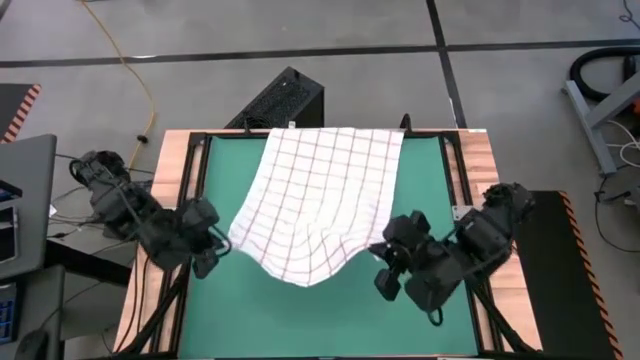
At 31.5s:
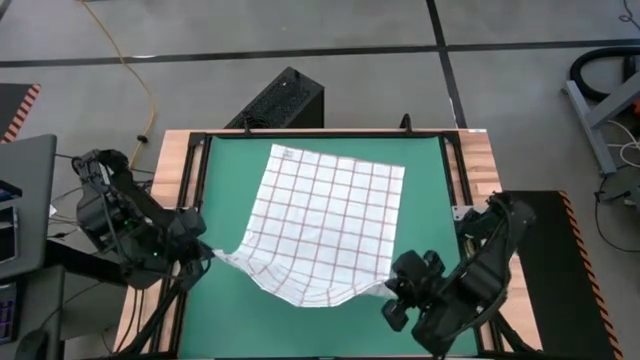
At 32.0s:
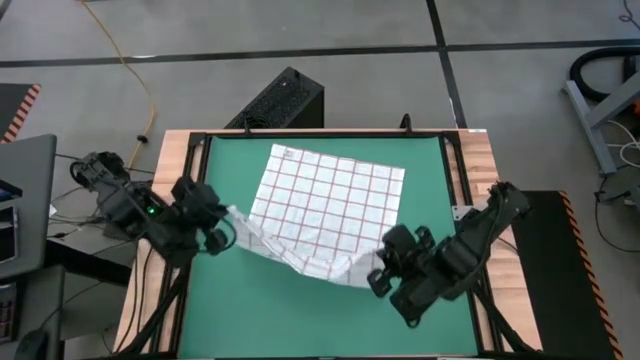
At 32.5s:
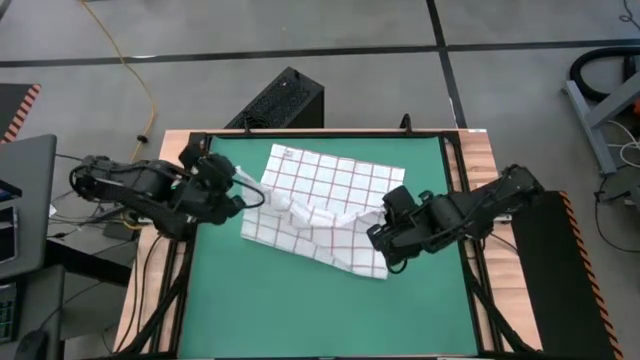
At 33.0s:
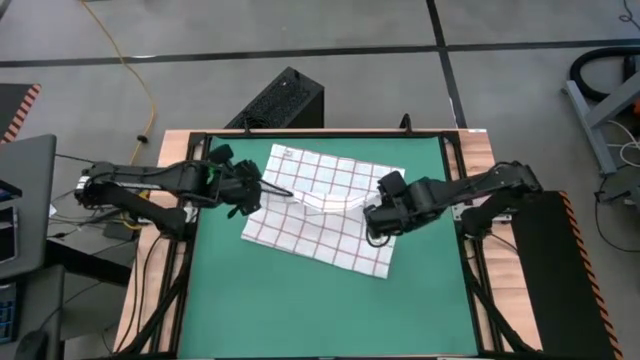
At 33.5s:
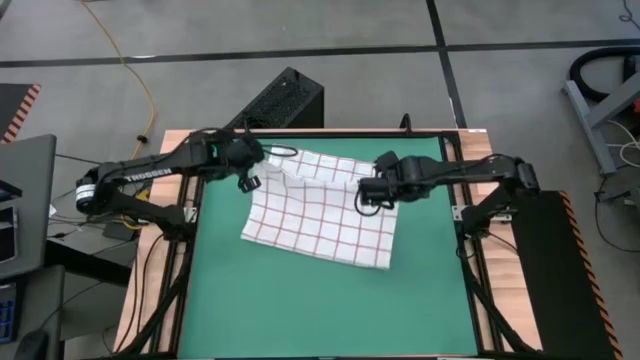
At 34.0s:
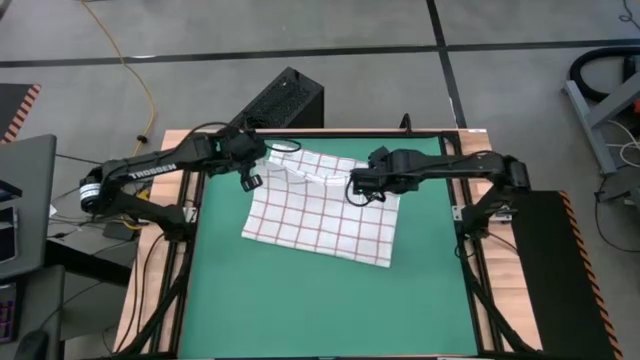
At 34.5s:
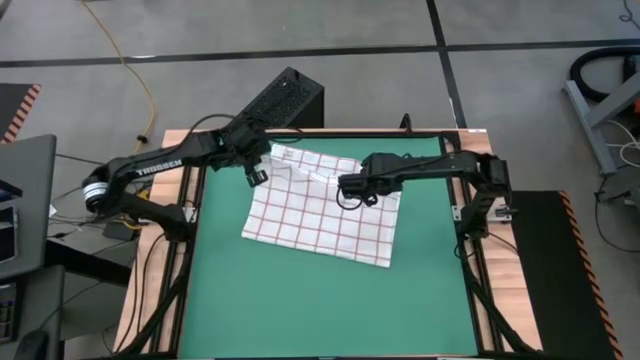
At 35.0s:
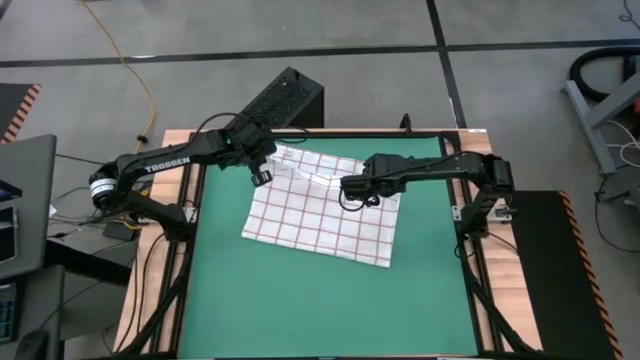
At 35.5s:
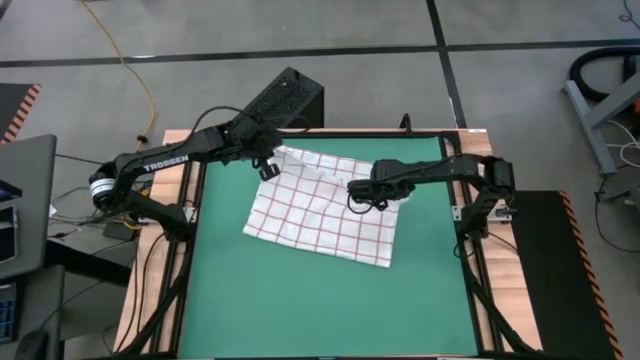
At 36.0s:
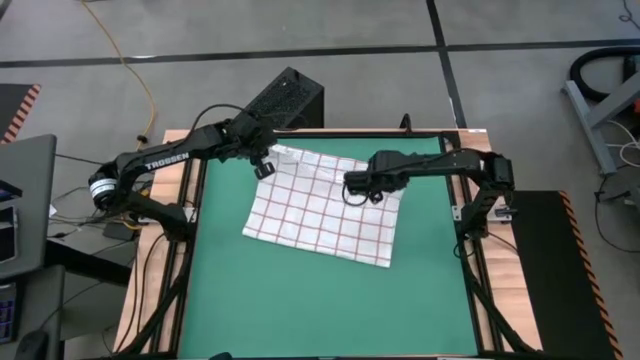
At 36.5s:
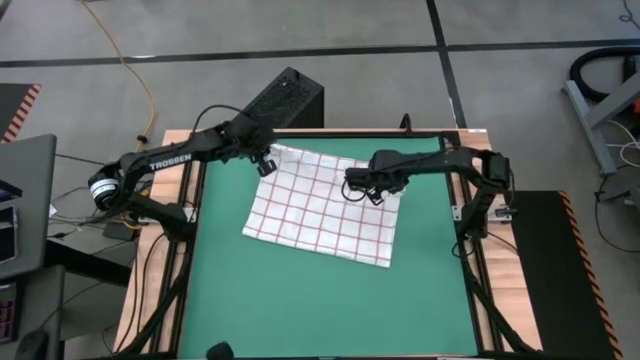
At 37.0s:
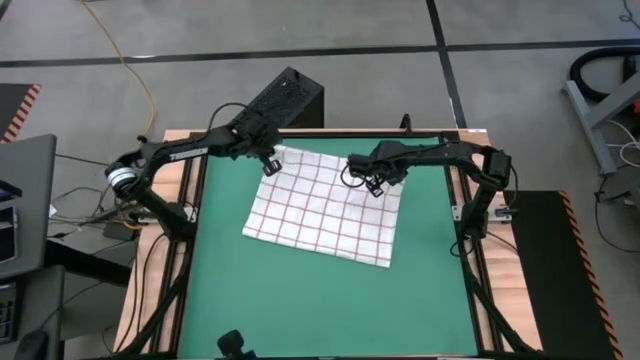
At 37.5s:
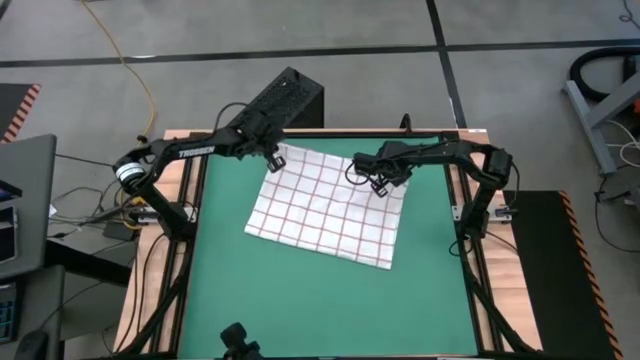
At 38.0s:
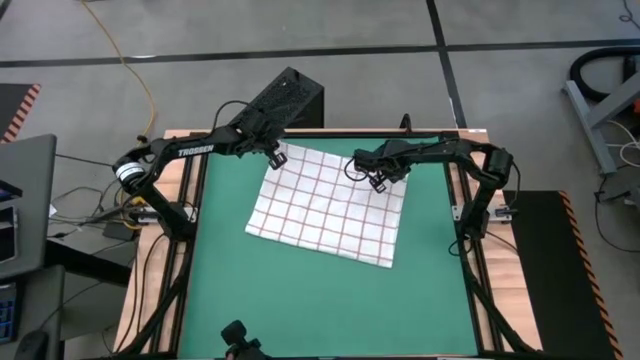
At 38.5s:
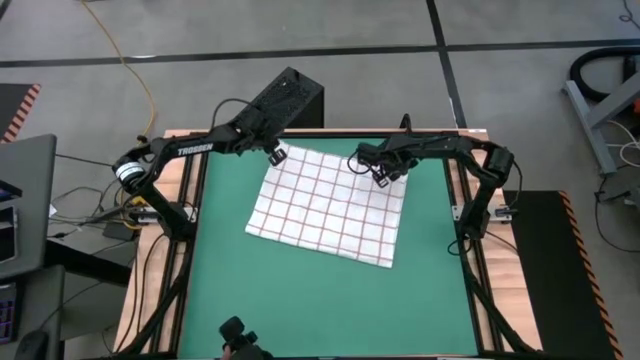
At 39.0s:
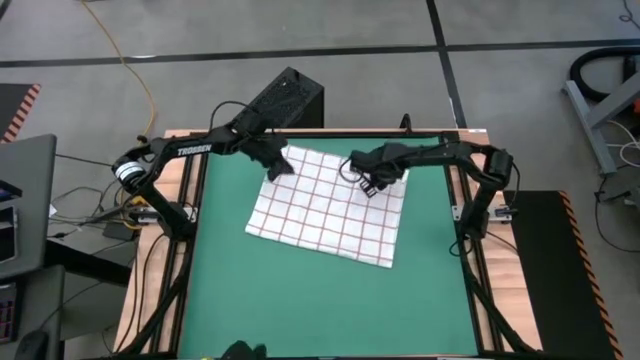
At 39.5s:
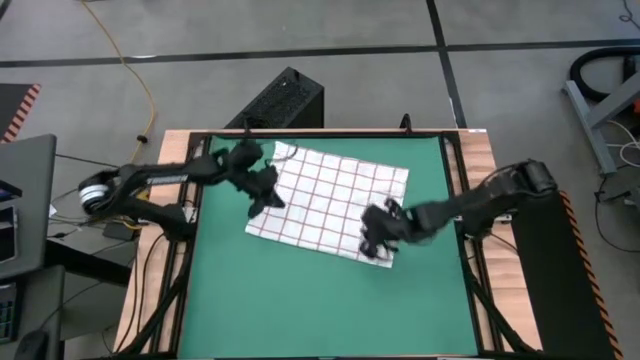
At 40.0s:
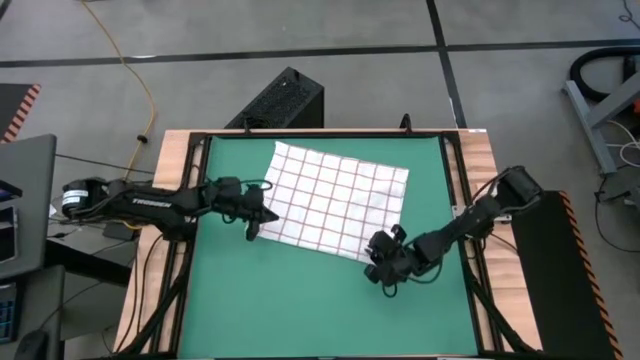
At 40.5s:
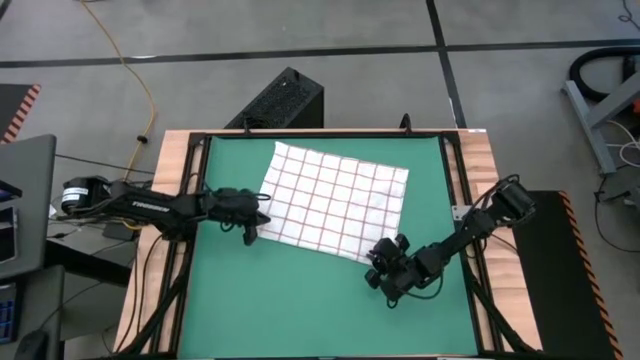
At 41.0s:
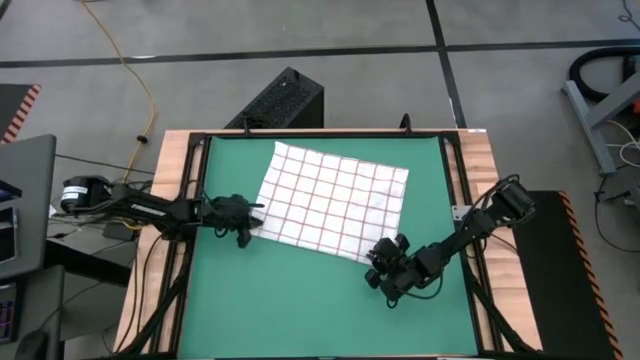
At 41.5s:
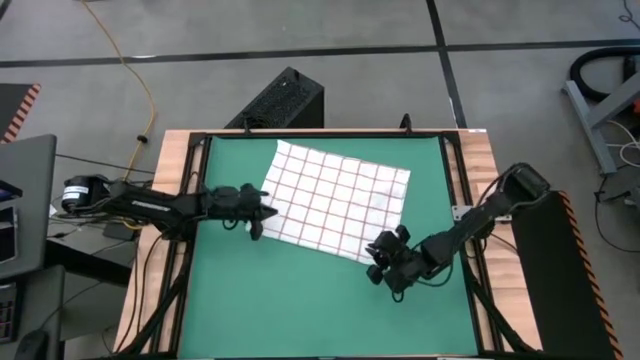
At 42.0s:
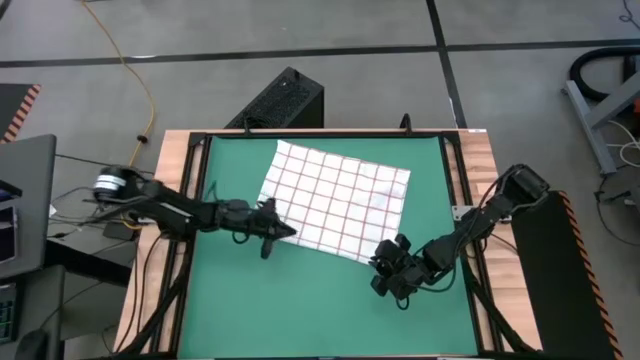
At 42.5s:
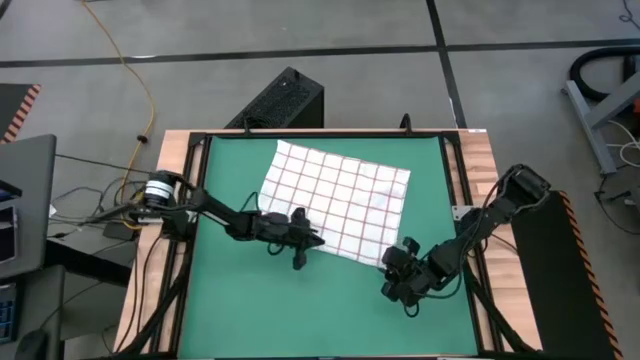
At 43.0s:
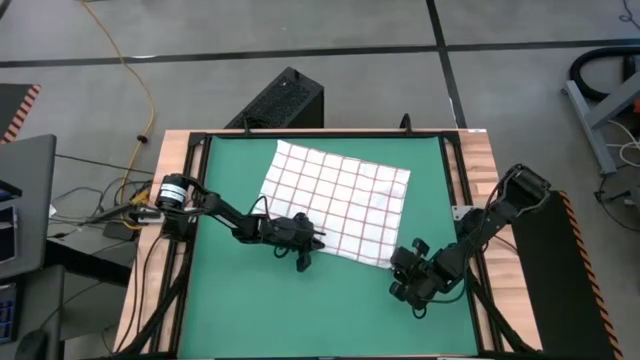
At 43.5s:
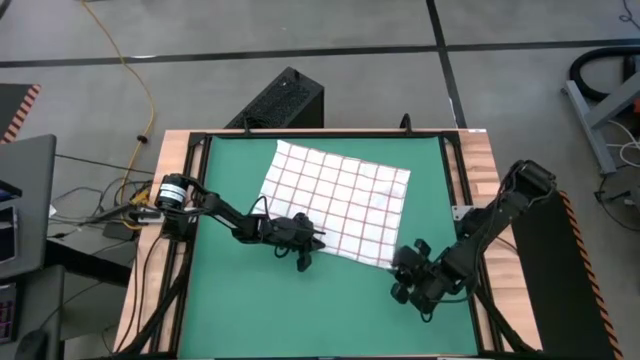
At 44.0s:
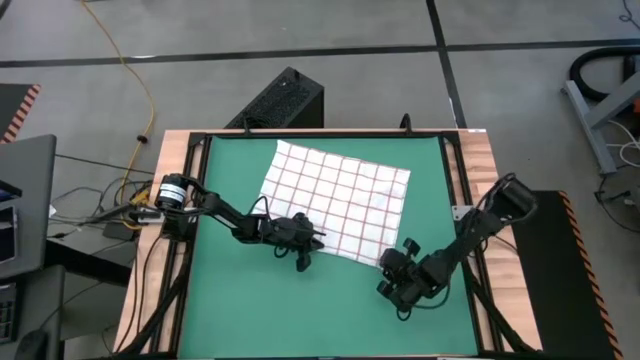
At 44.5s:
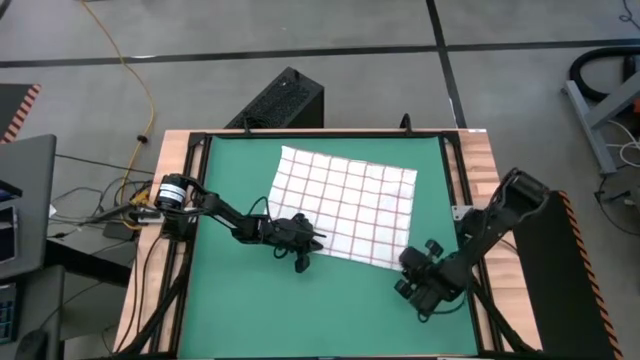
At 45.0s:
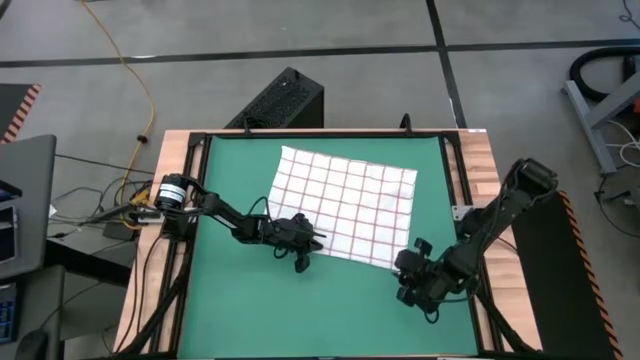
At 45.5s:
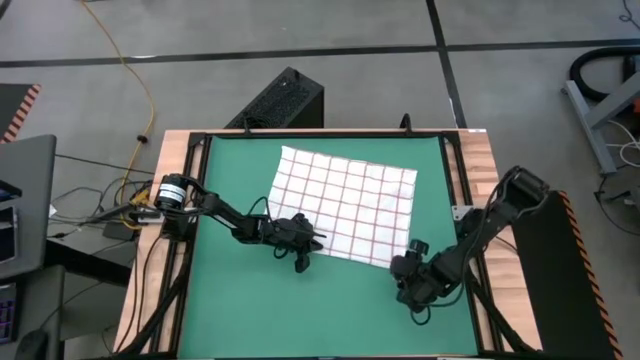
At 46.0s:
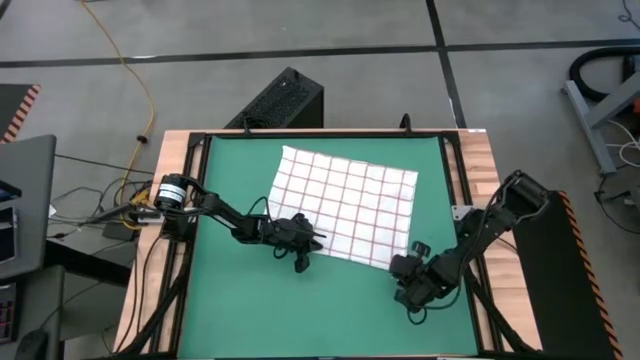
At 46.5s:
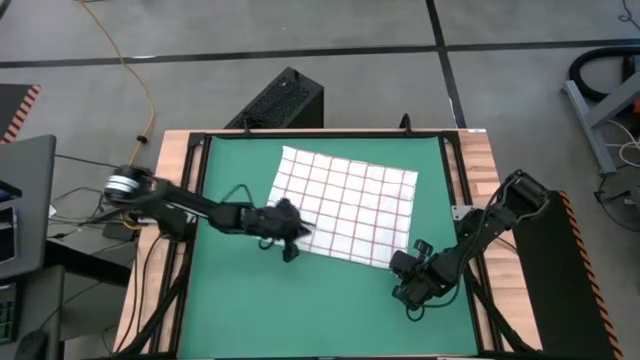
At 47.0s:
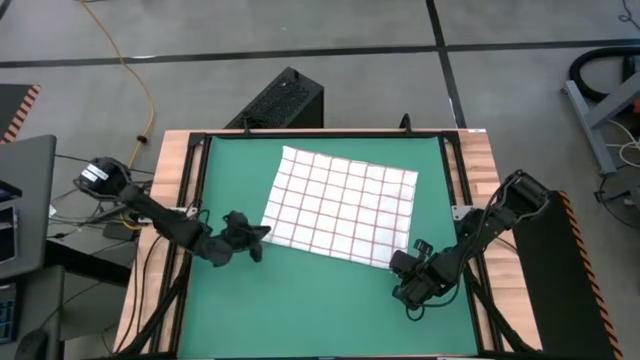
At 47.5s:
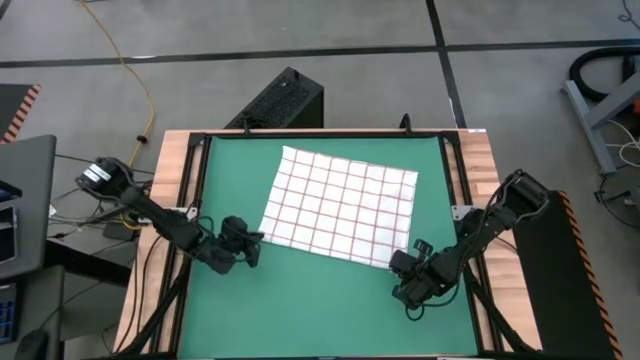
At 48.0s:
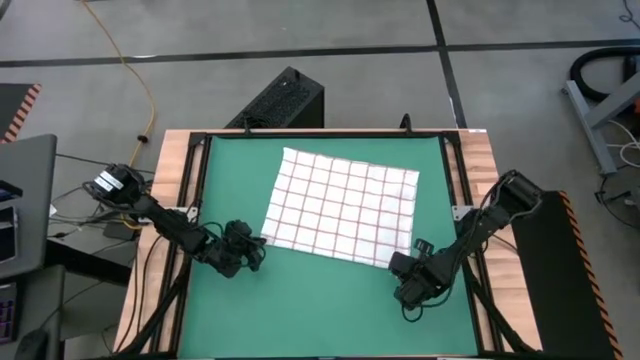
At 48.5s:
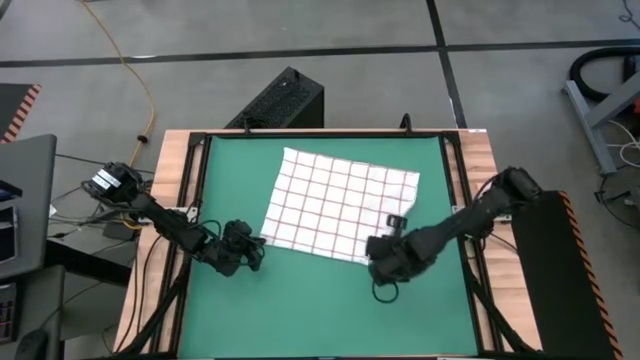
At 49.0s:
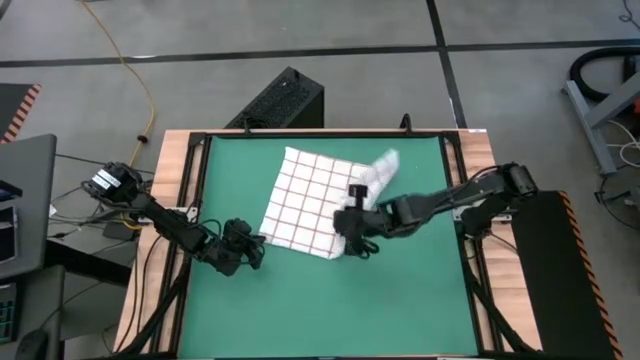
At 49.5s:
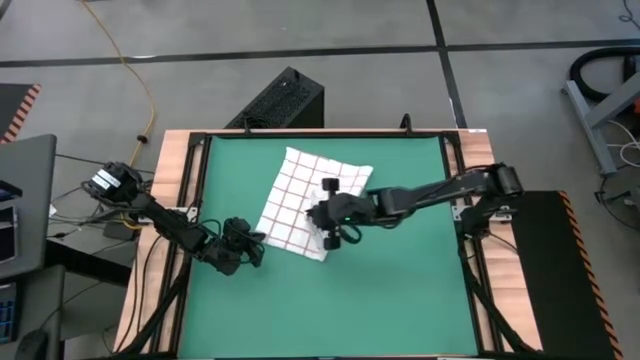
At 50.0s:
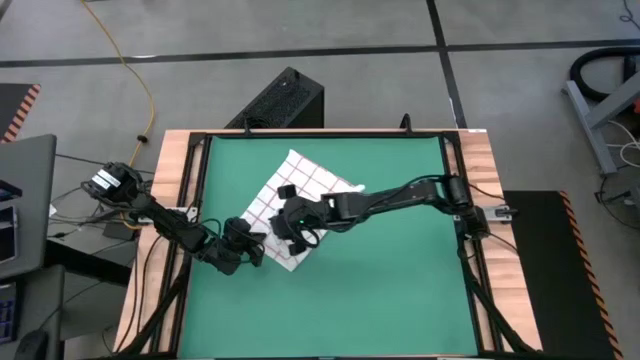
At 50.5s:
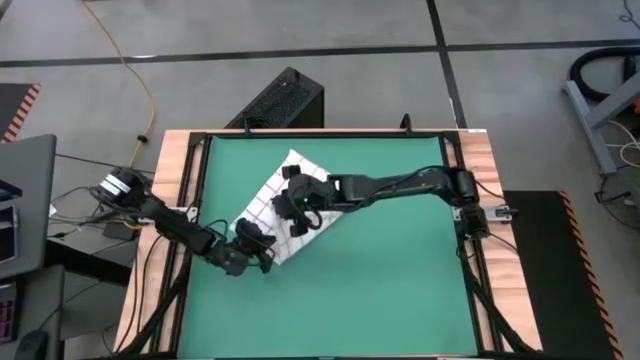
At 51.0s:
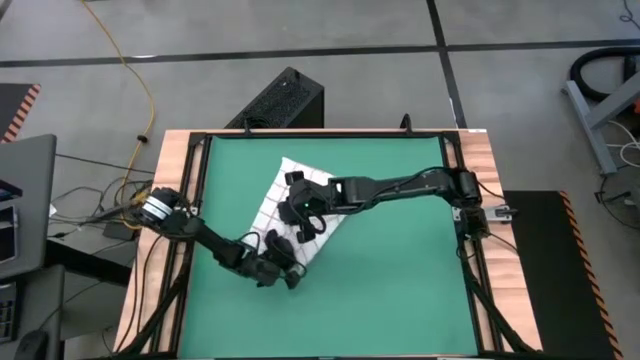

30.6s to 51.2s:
Task: Roll towel
Roll the white towel

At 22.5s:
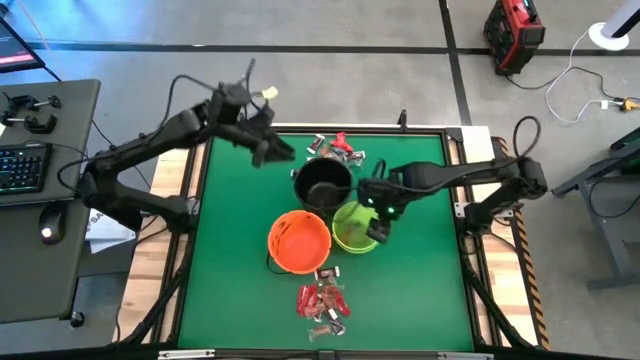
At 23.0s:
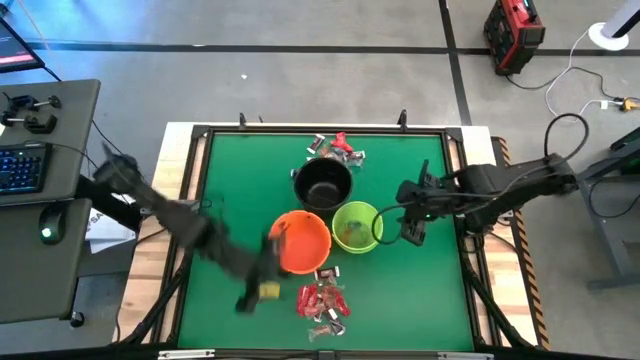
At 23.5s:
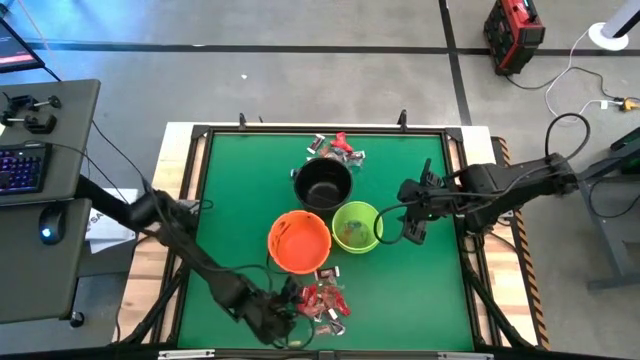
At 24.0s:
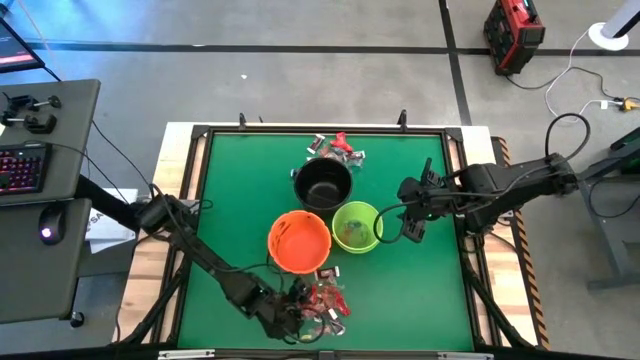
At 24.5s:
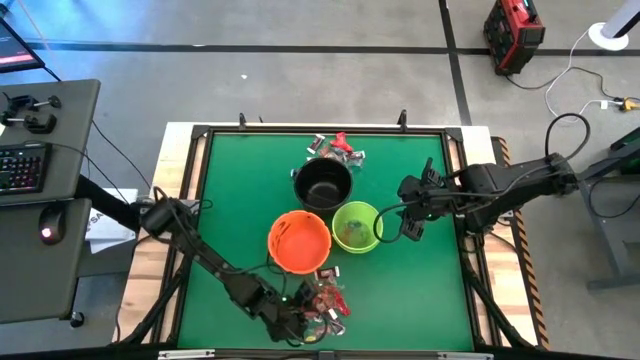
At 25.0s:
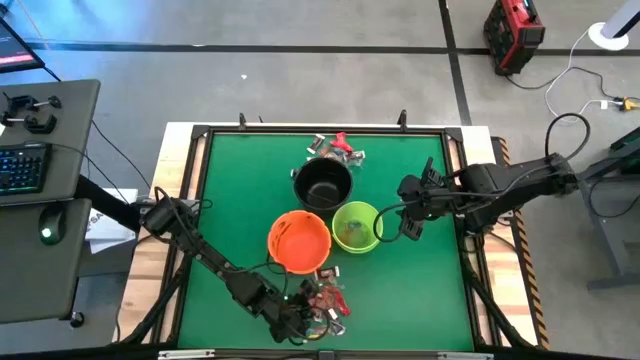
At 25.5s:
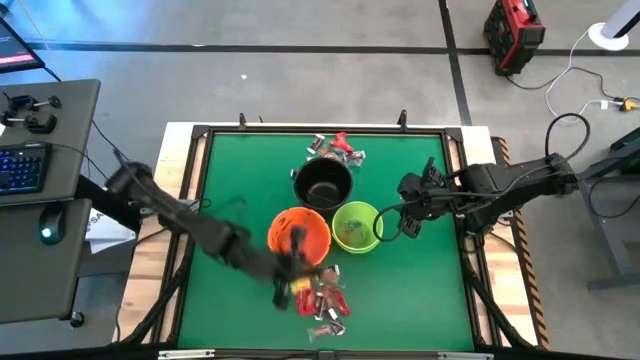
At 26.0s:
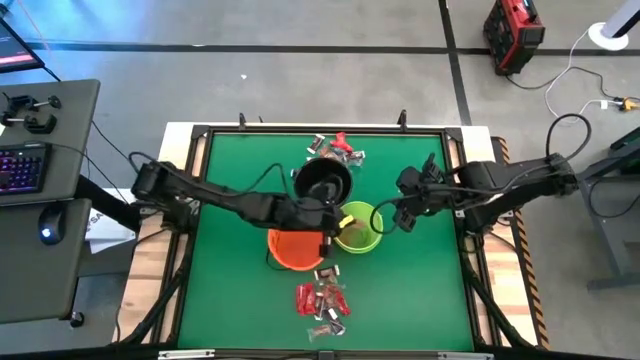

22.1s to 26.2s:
Task: Sort candy by brand, put in halloween buckets
Put the orange gummy into the green bucket
